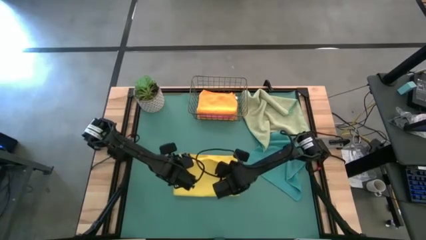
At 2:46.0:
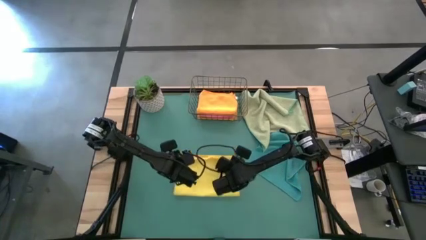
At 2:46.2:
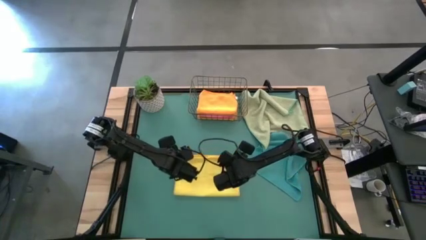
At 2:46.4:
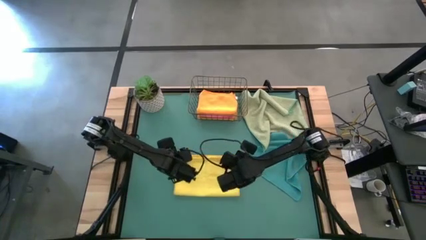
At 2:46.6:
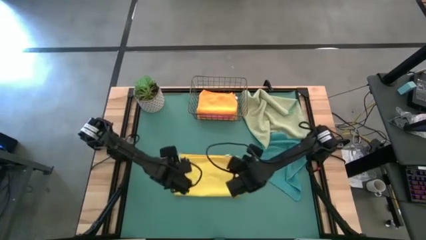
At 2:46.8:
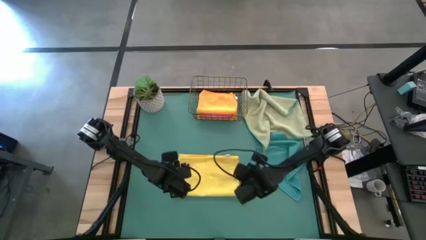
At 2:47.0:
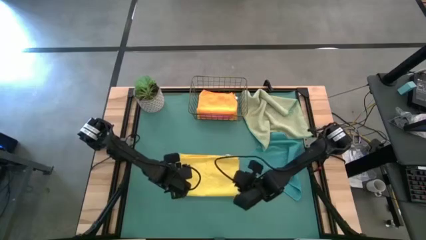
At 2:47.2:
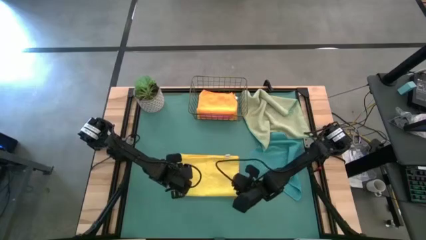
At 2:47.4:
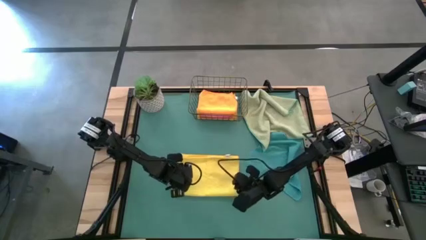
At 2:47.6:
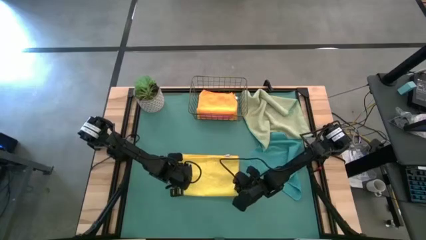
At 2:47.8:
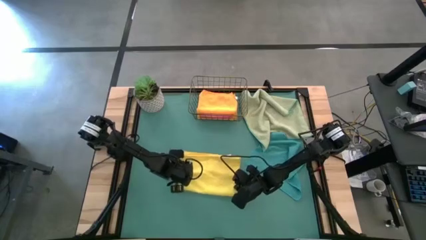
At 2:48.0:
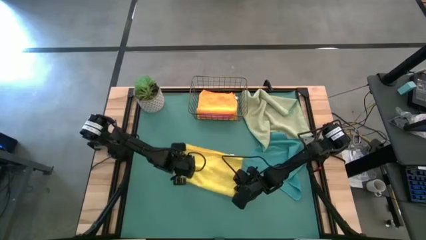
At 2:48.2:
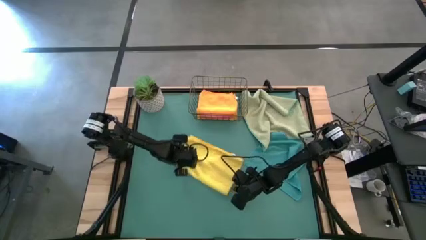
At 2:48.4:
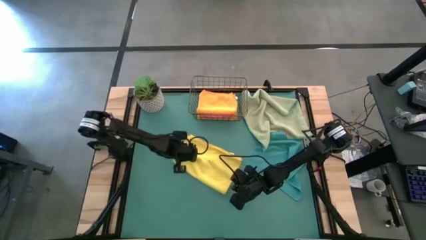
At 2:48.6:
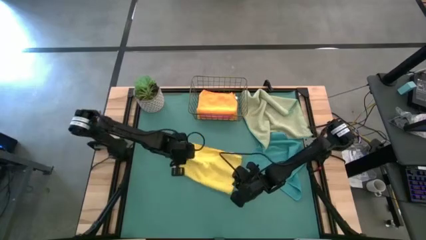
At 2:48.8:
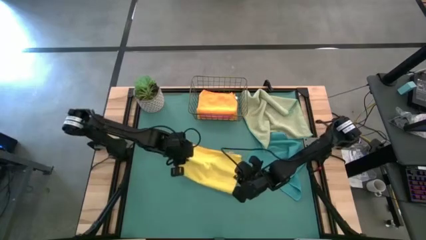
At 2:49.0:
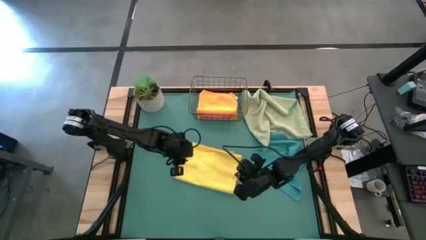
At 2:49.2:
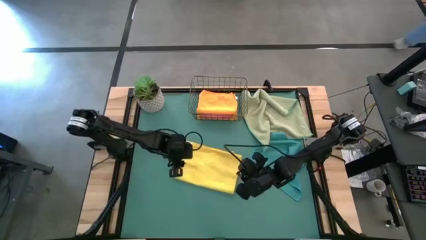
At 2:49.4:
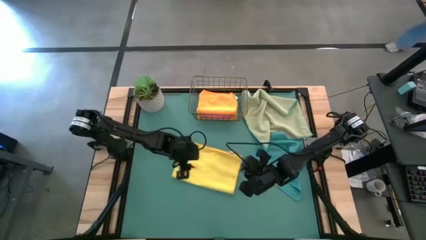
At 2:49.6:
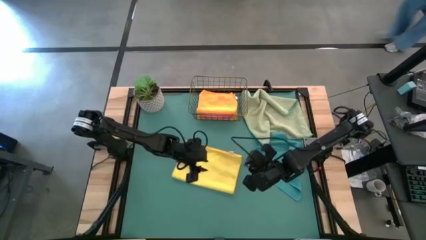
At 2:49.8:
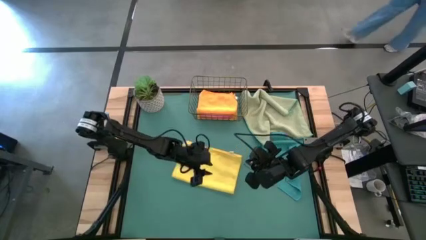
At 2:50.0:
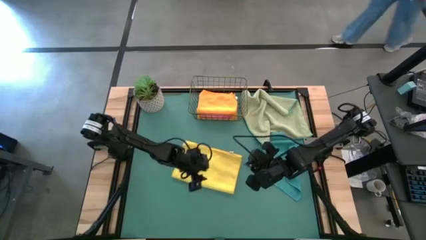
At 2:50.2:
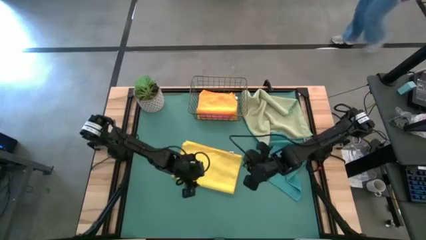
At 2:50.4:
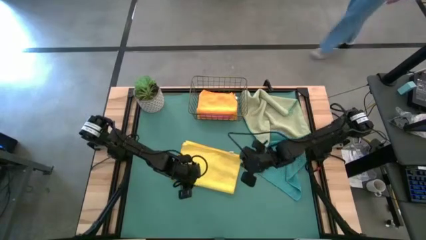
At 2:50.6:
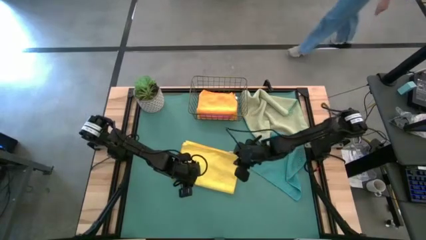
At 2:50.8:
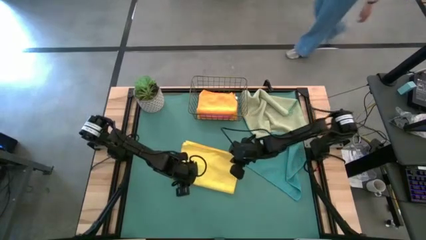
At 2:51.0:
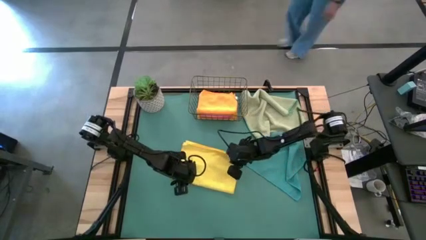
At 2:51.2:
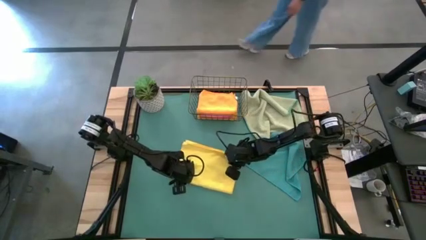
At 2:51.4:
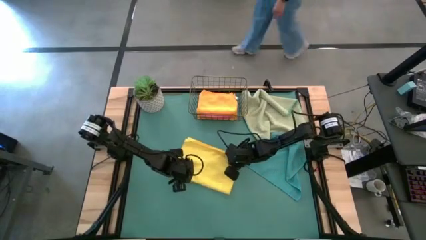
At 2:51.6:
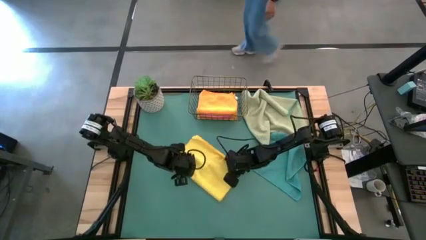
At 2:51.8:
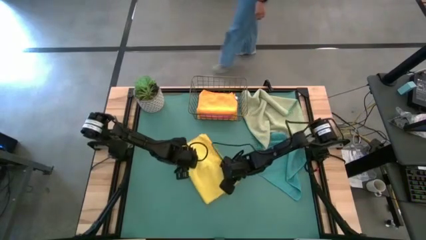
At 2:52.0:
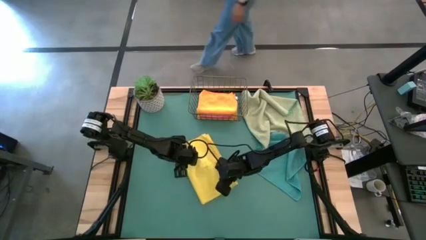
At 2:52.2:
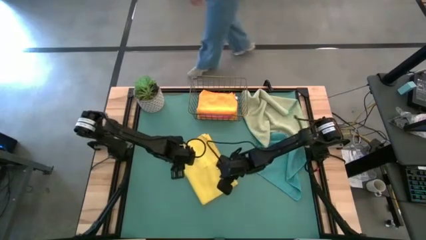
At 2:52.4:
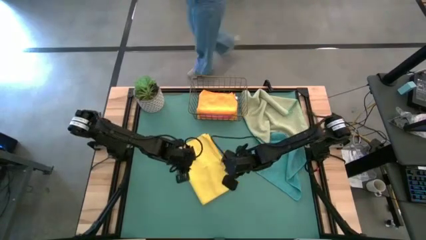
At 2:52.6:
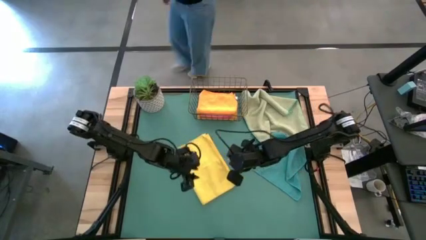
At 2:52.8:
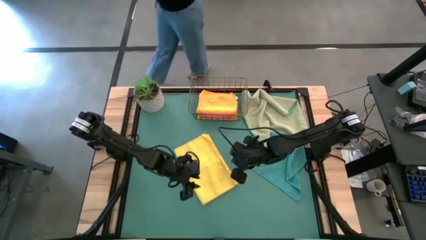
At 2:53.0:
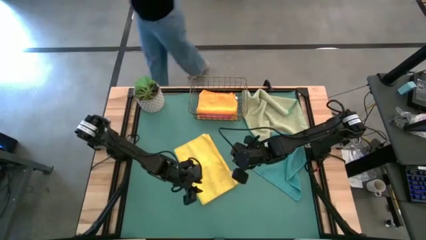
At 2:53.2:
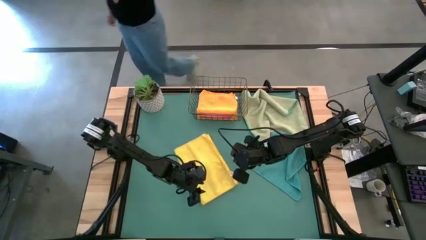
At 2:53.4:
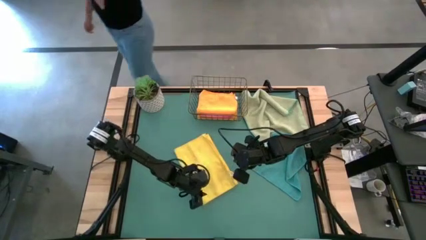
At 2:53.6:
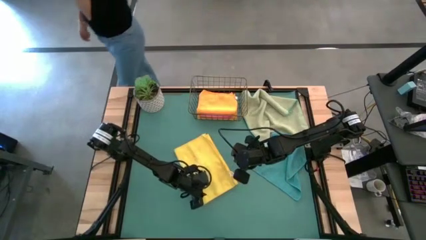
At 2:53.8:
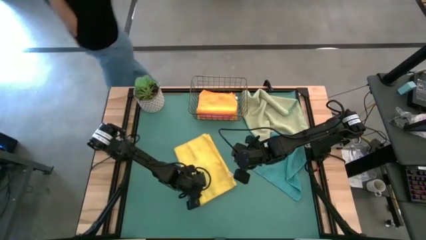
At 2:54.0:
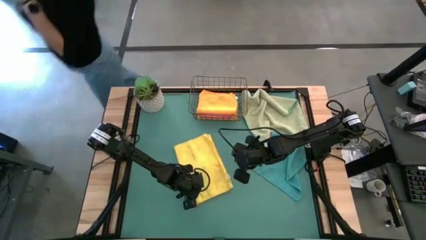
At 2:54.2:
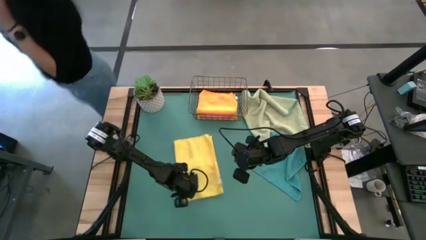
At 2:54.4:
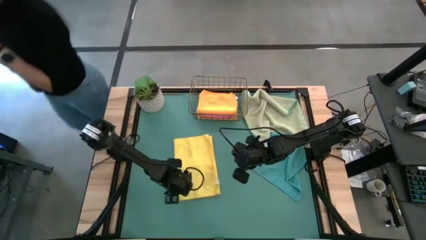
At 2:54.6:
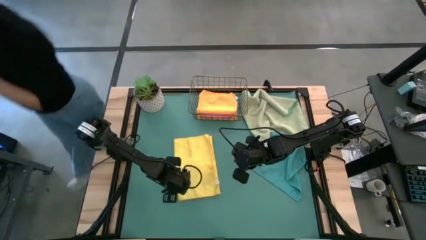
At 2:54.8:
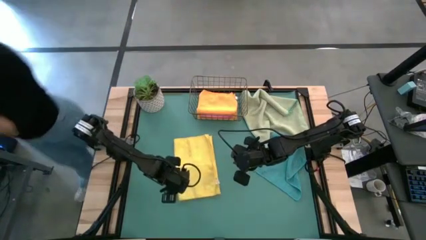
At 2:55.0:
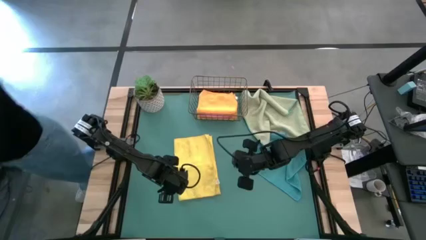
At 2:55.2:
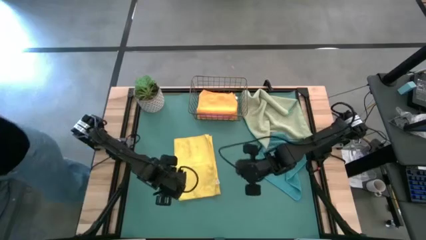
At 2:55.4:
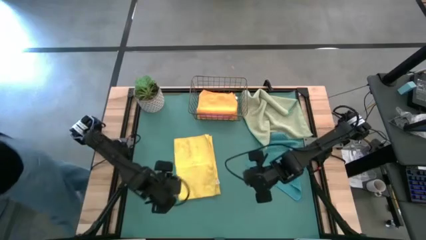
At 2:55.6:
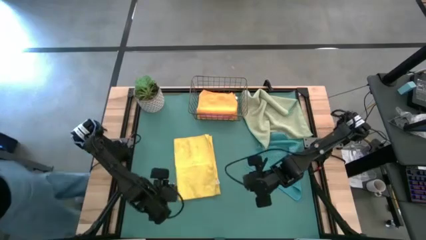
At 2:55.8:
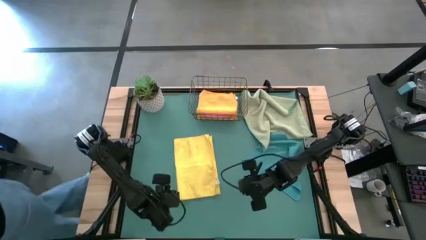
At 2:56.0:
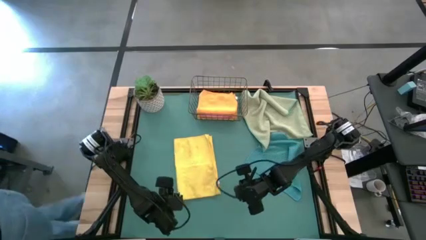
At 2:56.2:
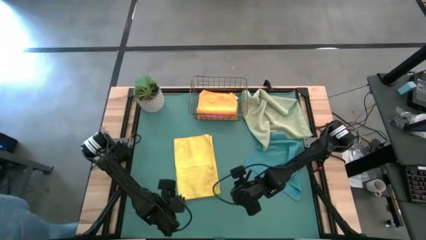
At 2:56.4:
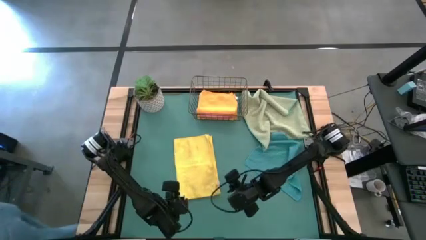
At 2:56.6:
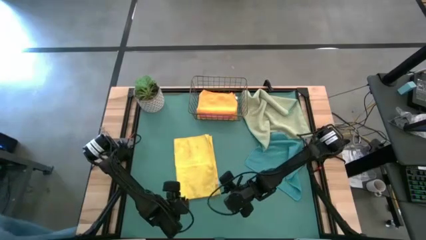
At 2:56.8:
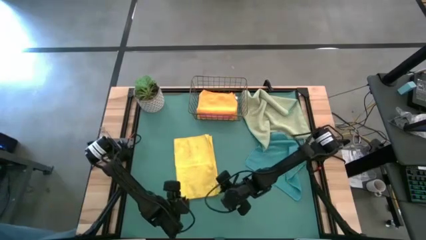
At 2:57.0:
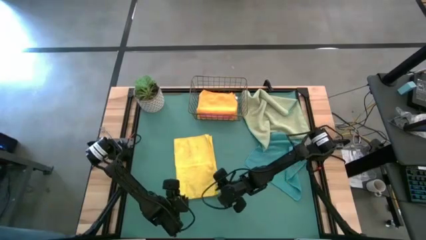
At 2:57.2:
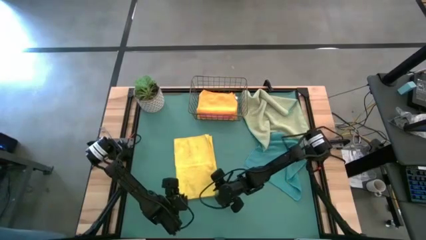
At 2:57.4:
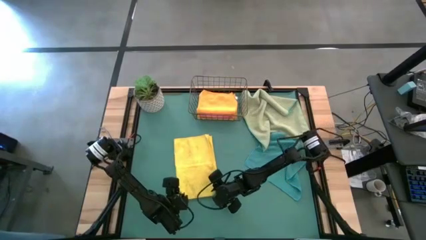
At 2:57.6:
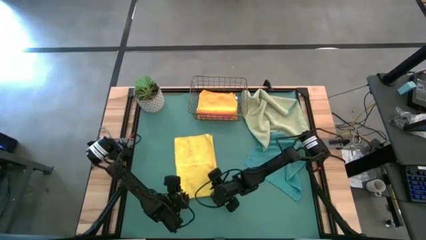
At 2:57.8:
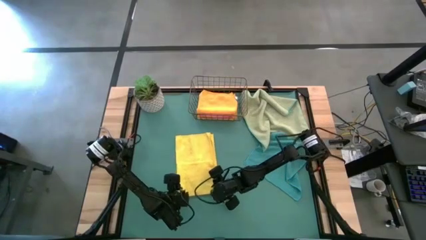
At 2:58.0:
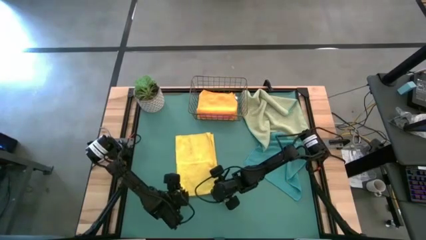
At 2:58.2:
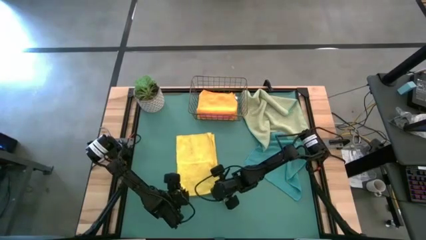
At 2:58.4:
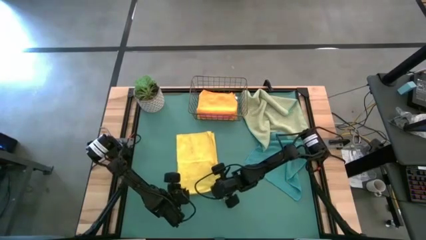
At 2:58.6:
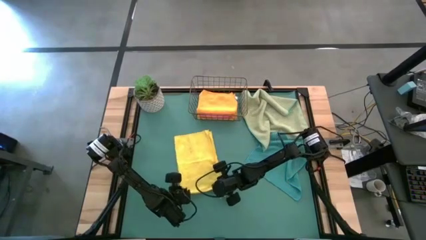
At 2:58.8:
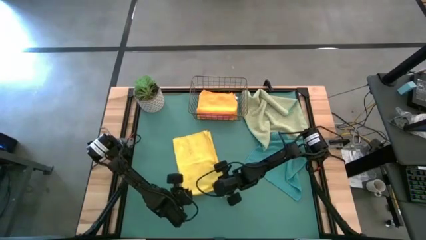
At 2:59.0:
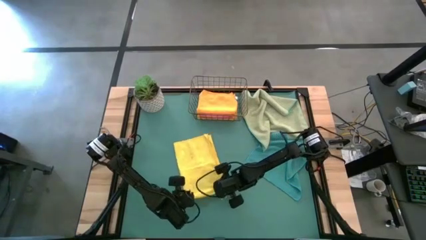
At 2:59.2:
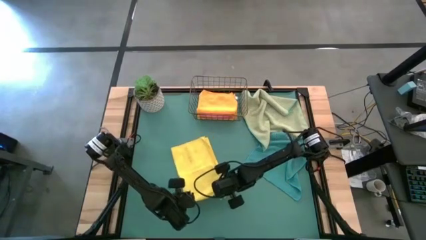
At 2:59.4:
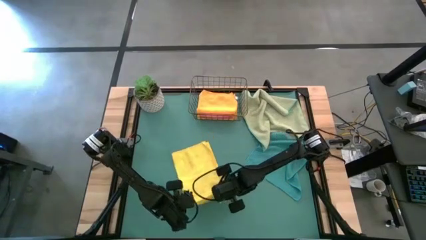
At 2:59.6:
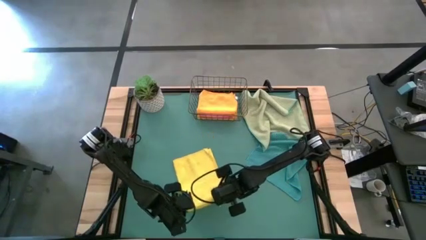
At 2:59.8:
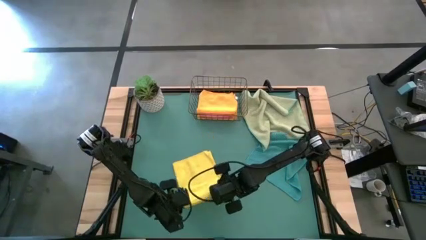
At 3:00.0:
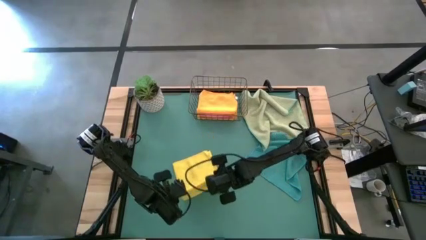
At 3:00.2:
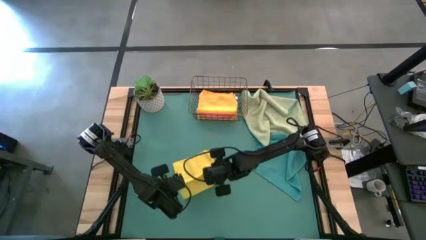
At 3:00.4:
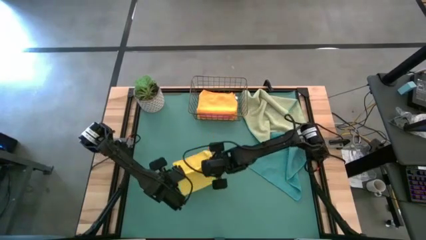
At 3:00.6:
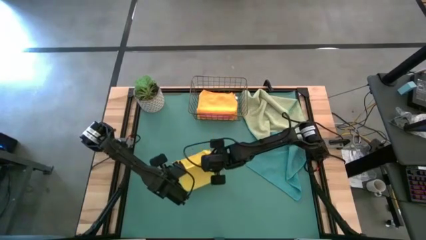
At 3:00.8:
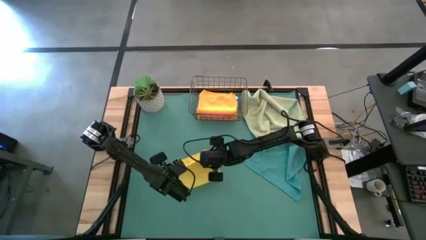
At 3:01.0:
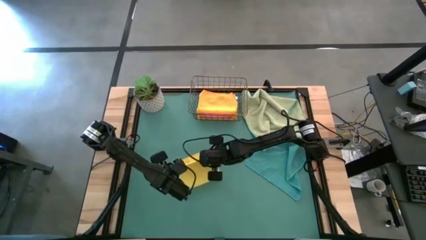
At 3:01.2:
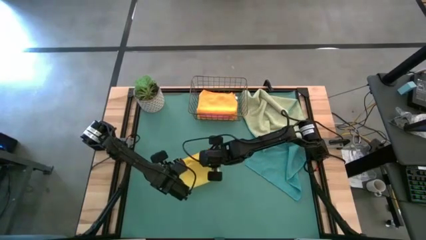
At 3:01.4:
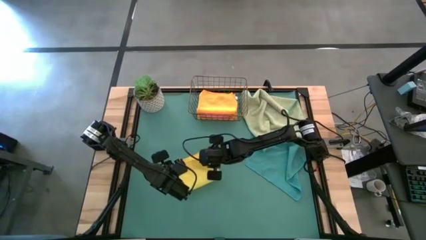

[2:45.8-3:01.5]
Task: Fold microfiber towels
Fold the yellow microfiber towel
